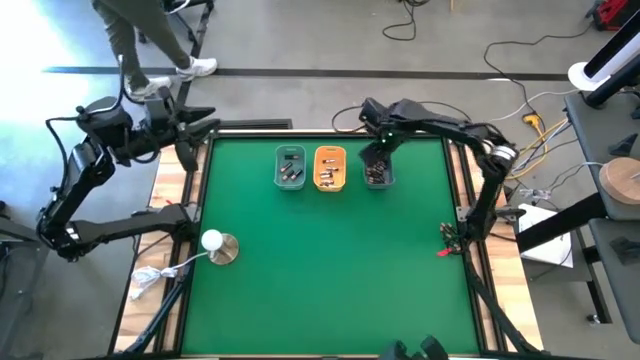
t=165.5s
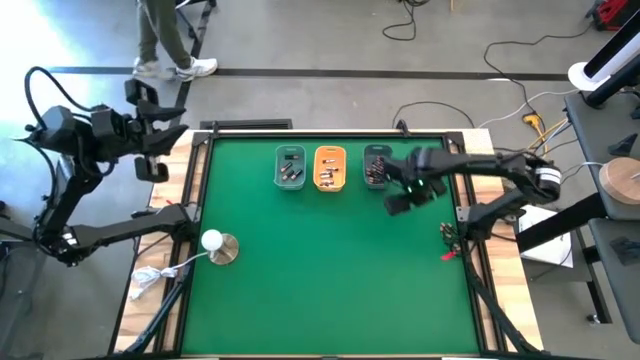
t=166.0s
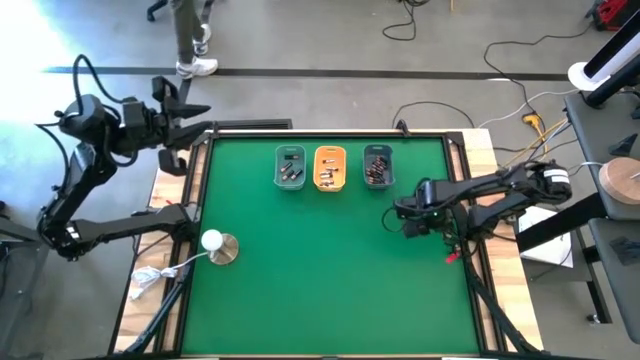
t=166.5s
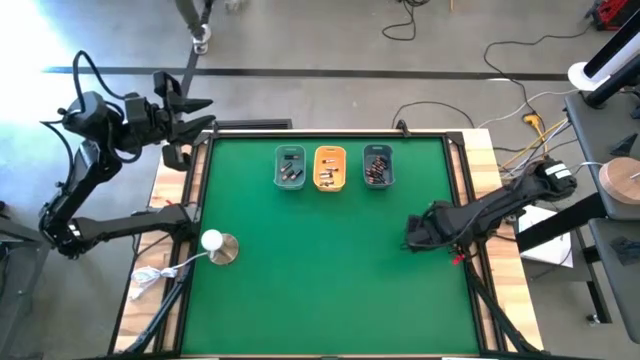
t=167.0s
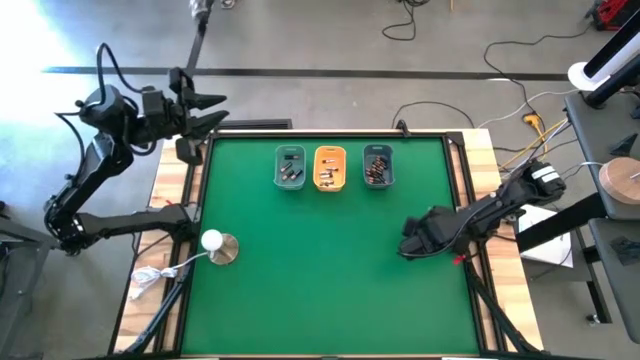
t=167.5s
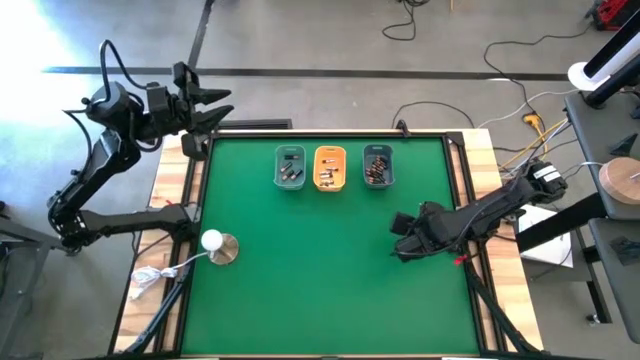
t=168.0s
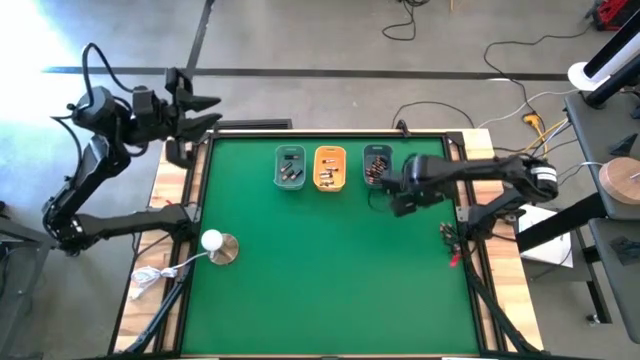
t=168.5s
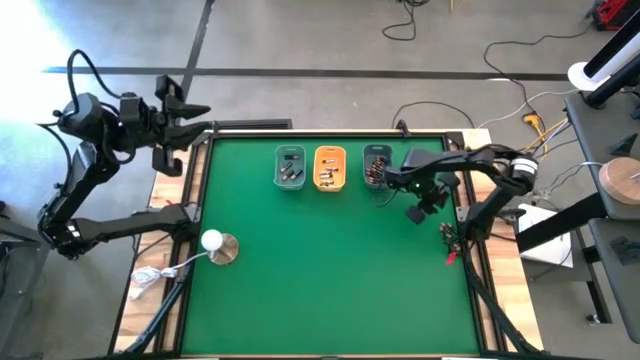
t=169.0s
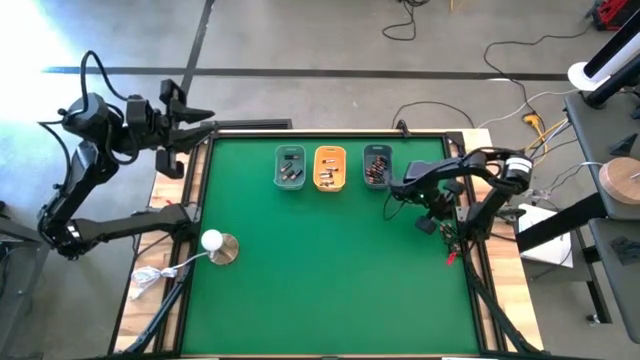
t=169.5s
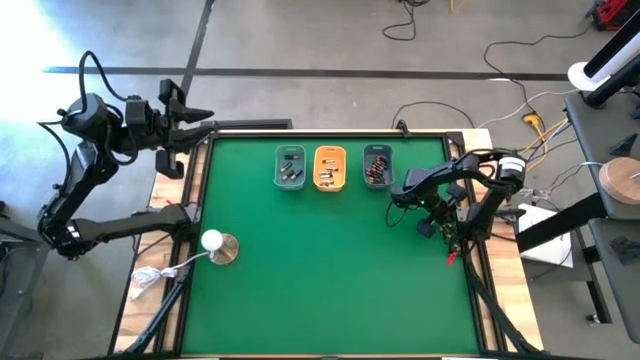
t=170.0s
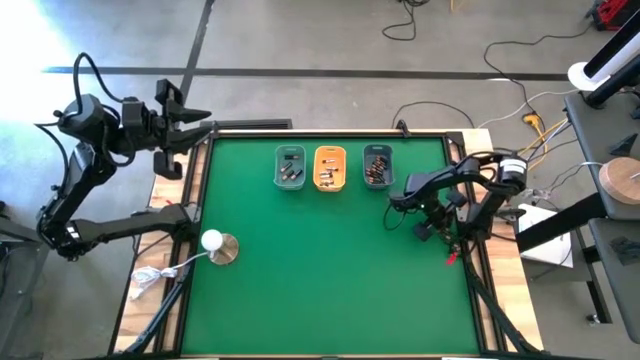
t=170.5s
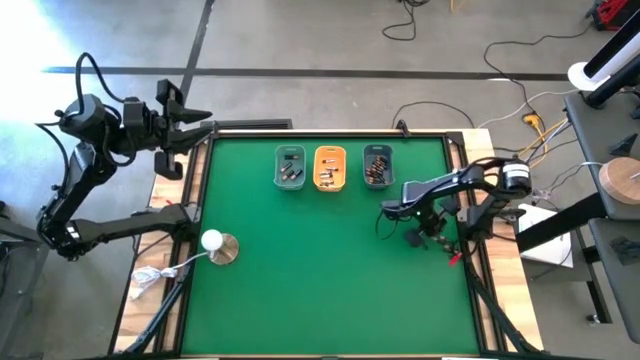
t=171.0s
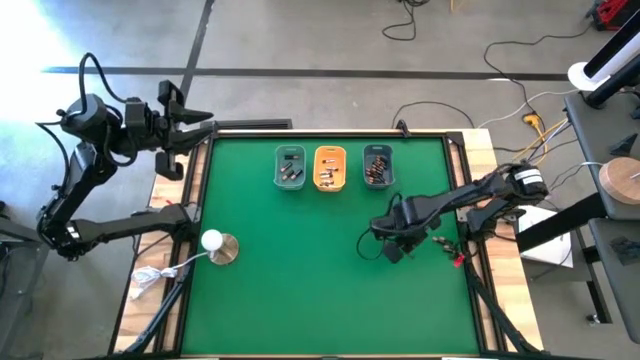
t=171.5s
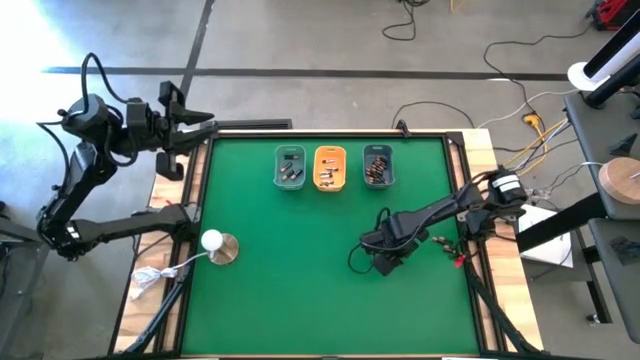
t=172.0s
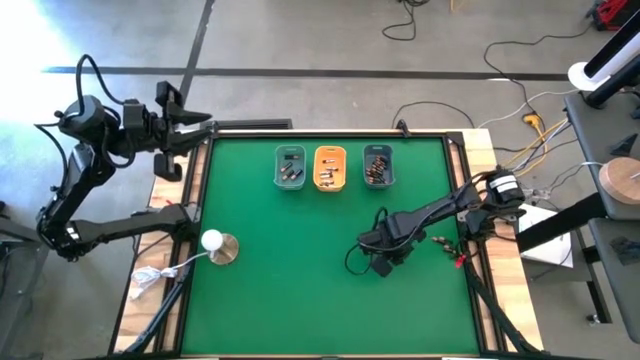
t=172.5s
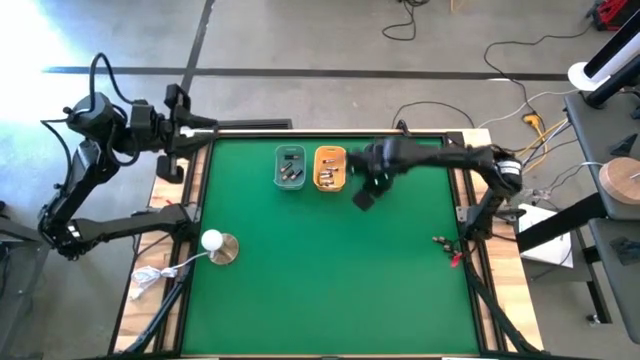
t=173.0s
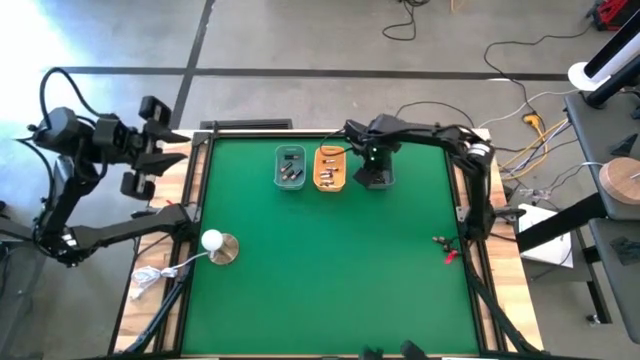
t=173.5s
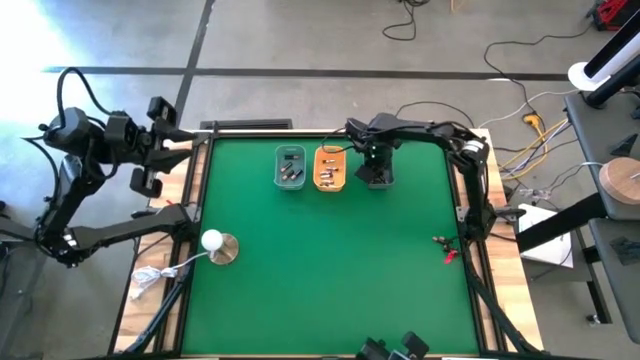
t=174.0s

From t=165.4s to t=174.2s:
Task: Sort batteries
Put the small brown battery into the gray bin

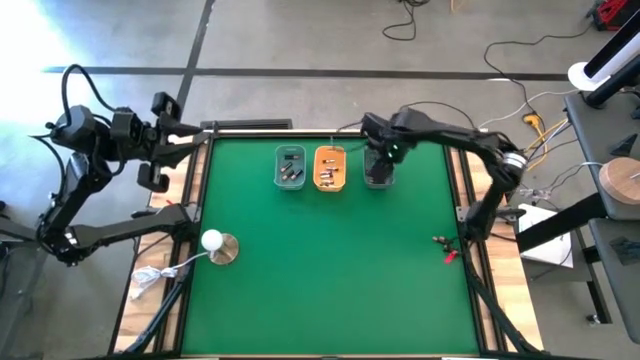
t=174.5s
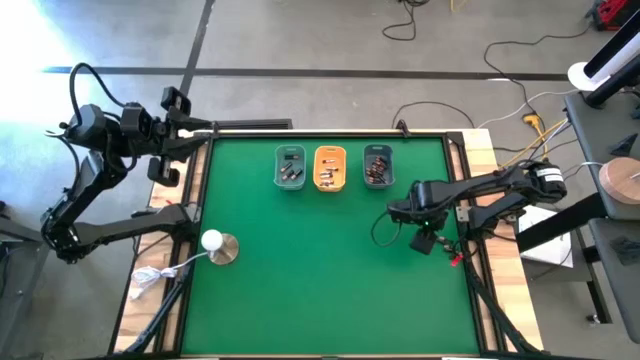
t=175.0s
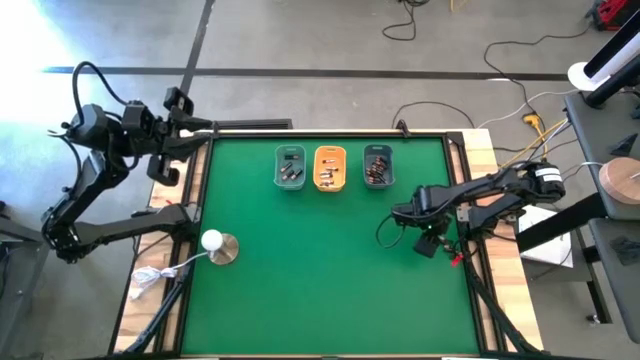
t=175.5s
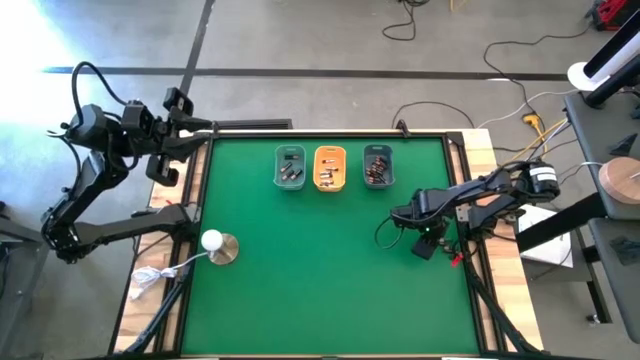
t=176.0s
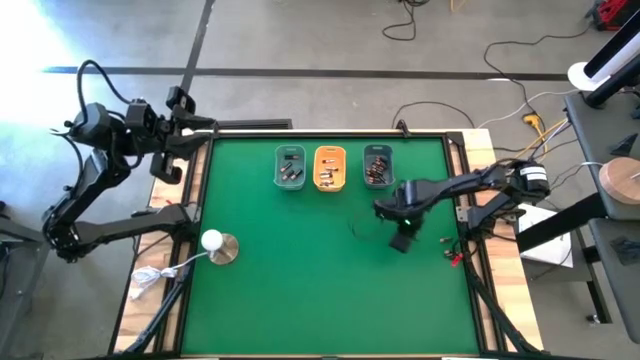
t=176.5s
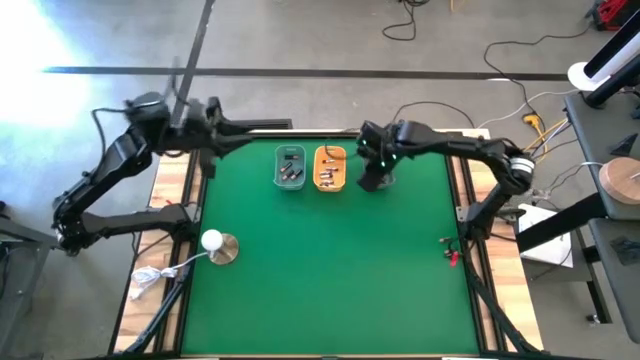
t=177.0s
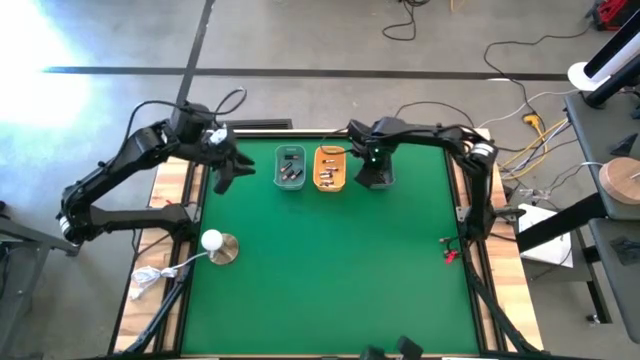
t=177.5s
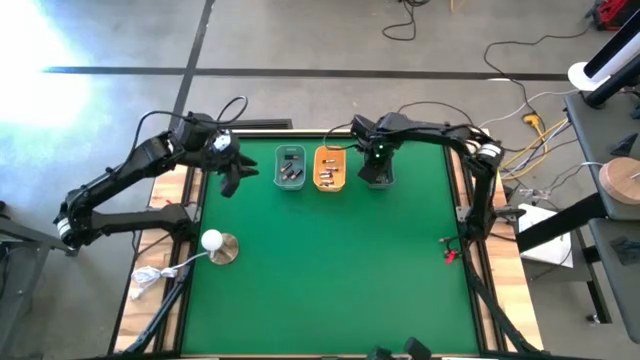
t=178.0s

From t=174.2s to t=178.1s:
Put the middle right triple a battery into the gray bin

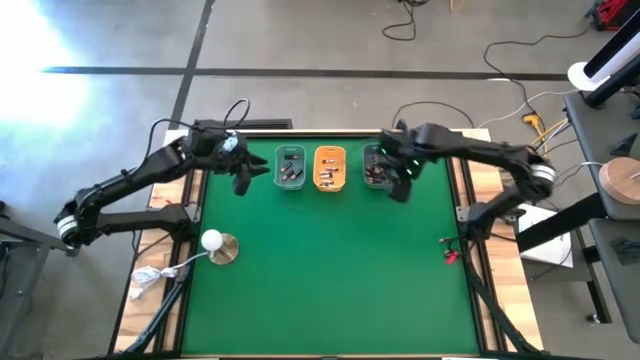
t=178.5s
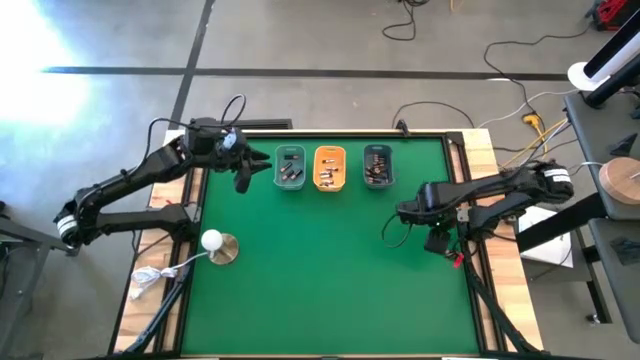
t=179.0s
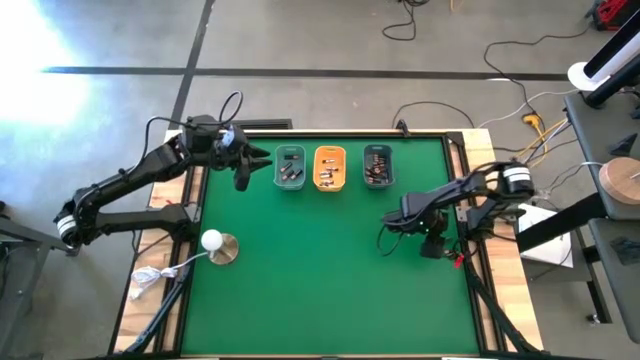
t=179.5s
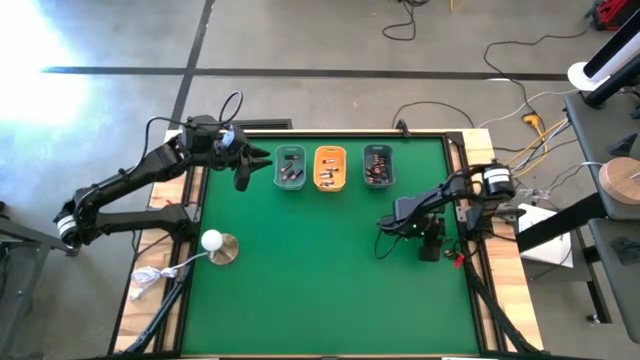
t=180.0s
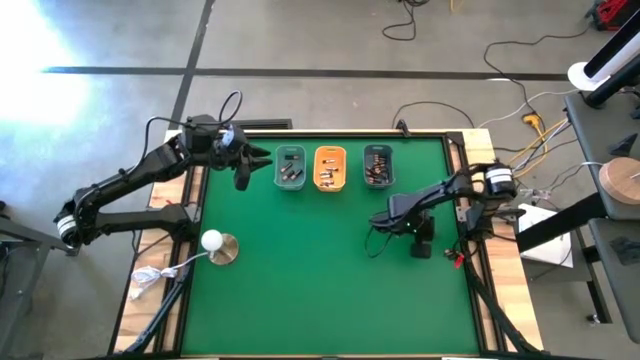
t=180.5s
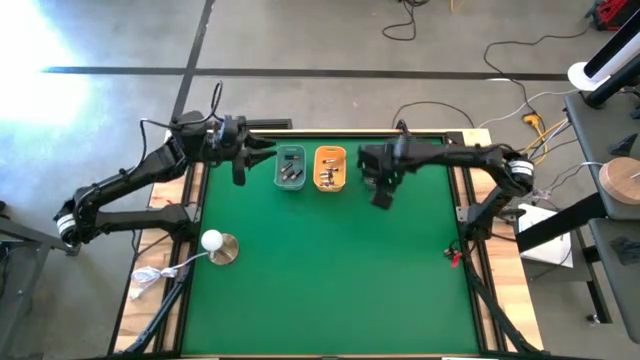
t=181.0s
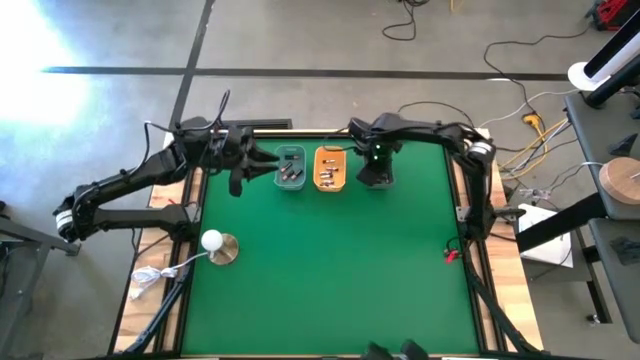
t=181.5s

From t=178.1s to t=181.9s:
Put the small brown battery into the gray bin

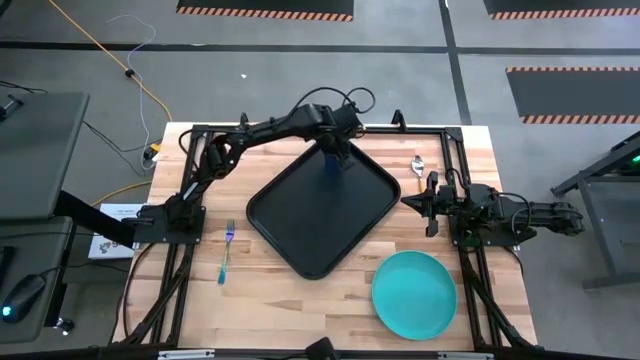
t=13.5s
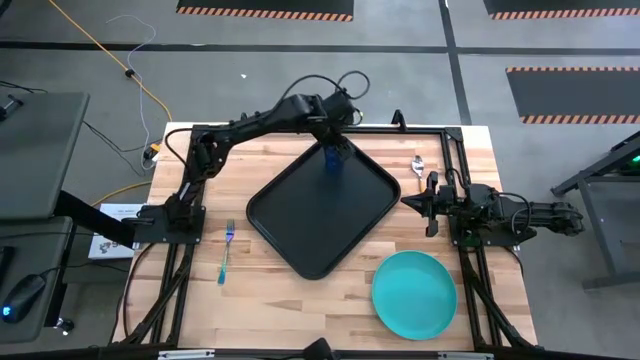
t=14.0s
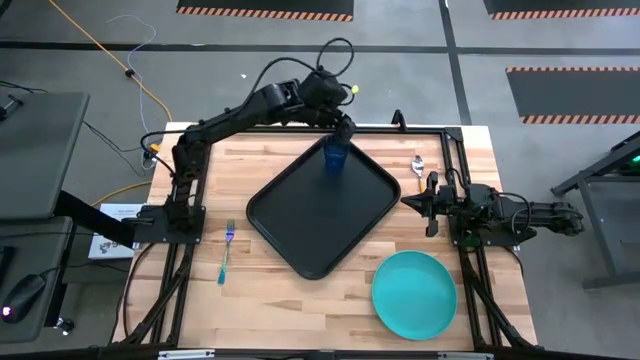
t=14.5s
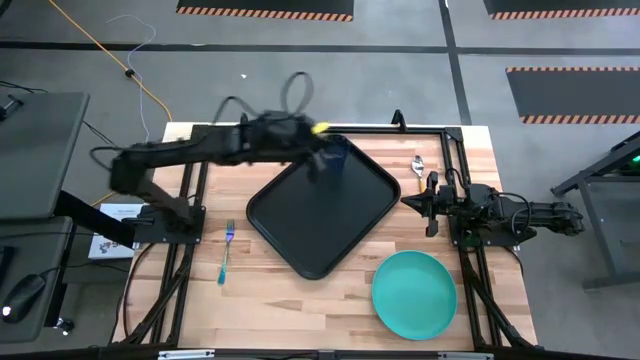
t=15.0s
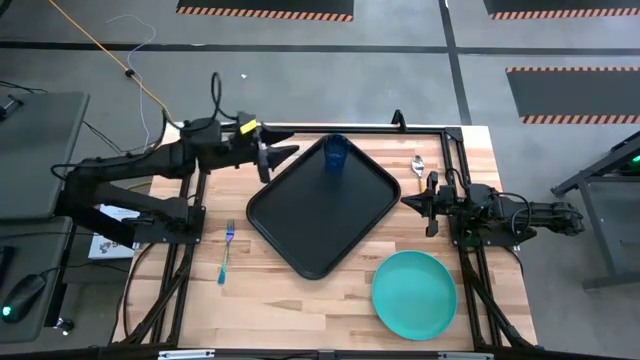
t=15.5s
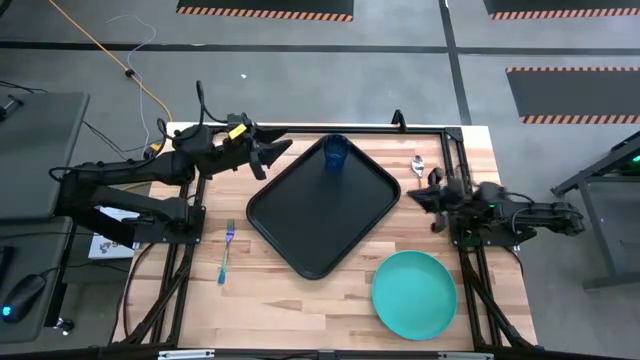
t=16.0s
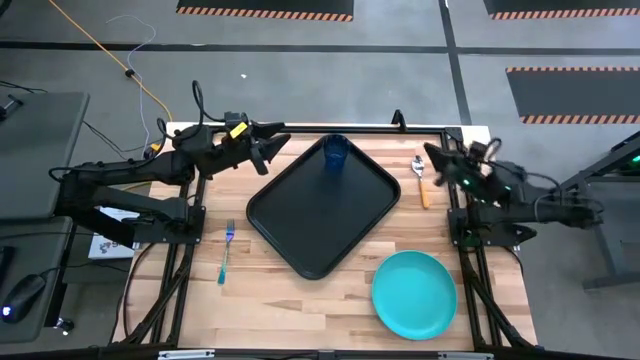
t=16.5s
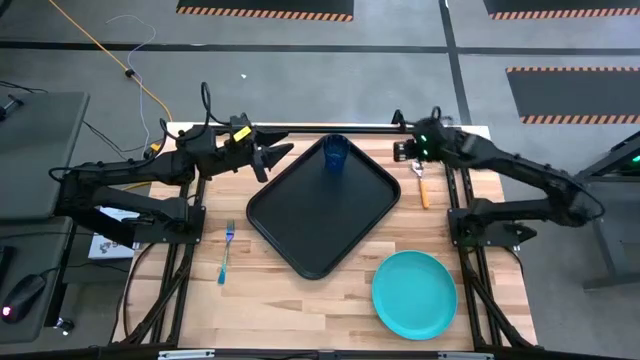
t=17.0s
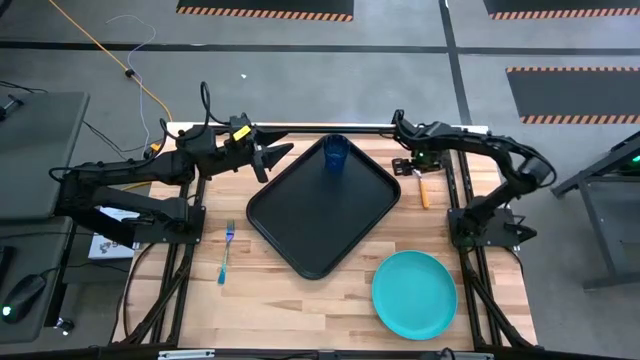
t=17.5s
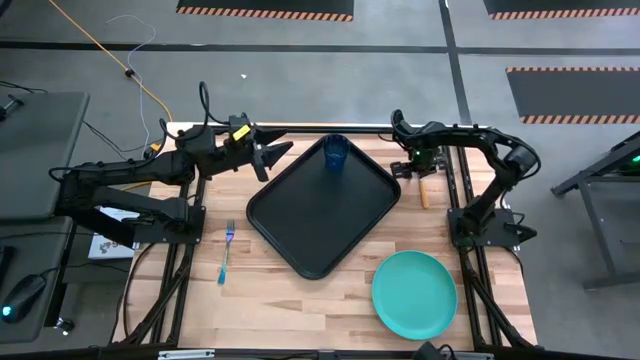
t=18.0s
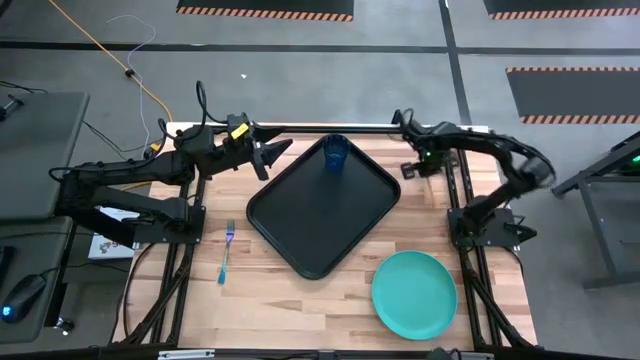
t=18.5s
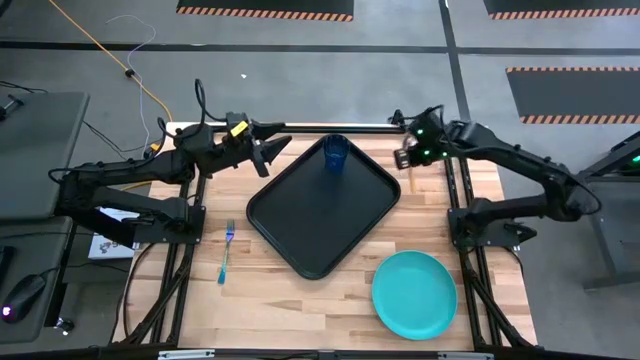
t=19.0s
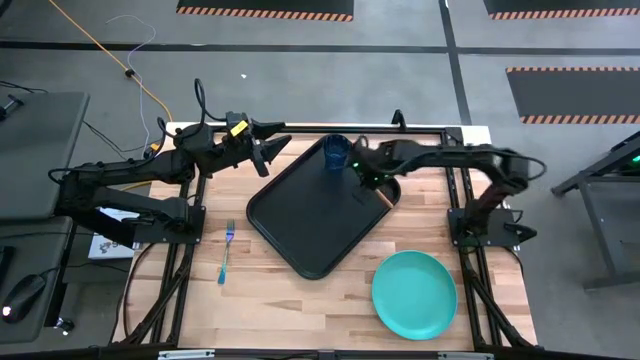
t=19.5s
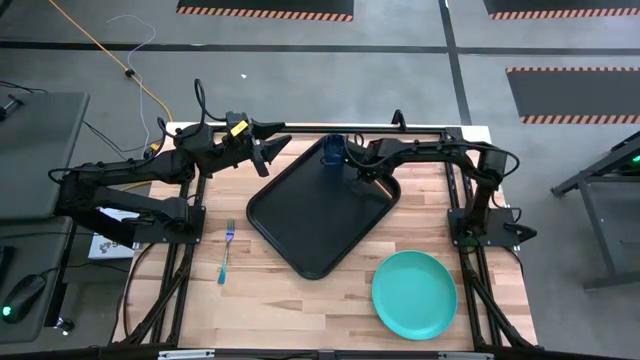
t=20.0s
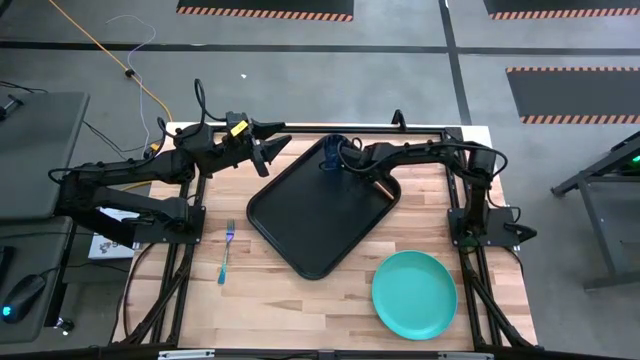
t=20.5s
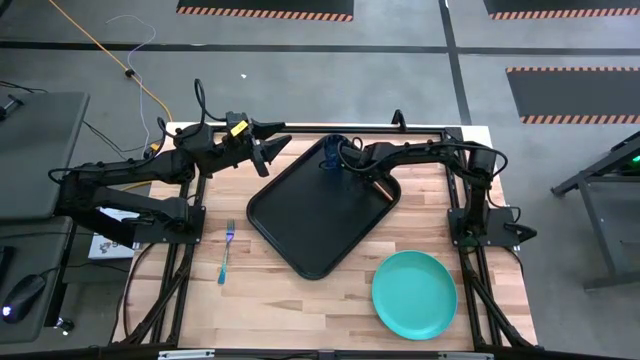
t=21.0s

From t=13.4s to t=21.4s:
Task: Pick and place plate/cup/fork/spoon on tray
Put the orange spoon on the black tray to the right of the blue cup
